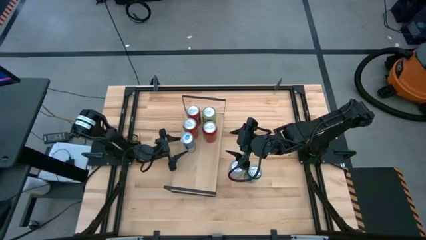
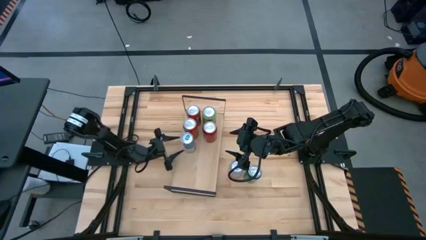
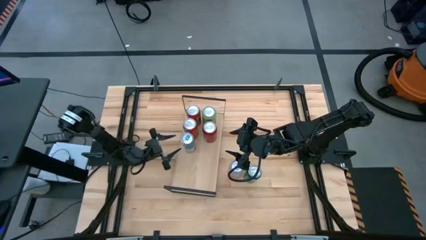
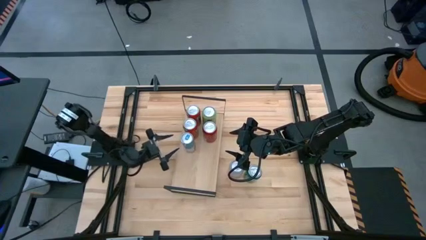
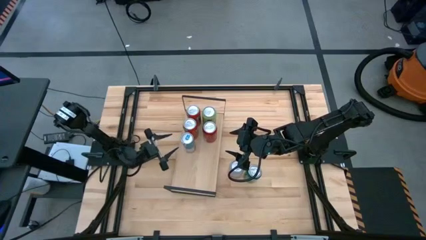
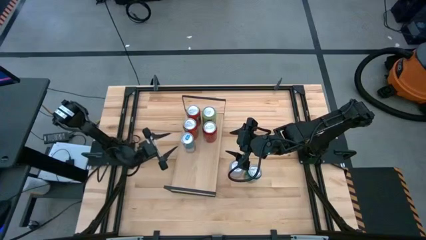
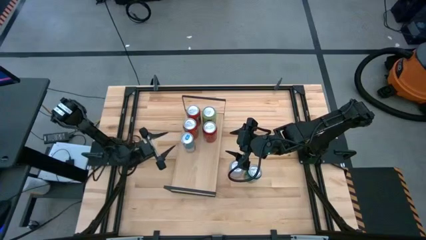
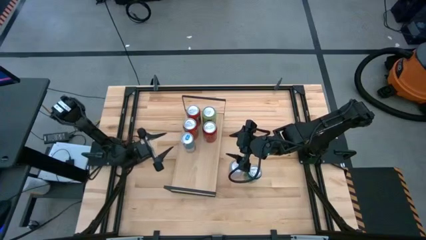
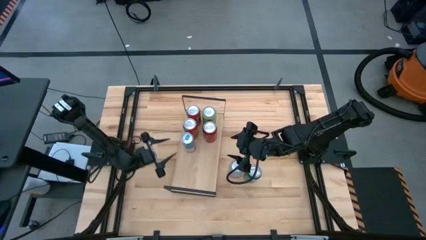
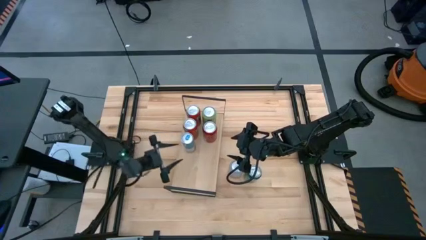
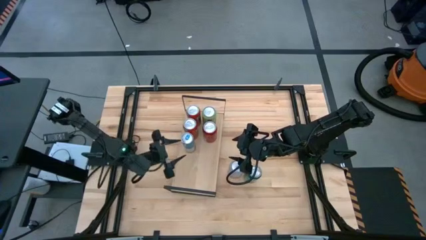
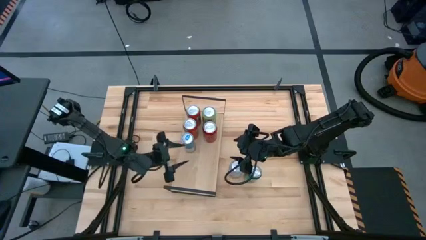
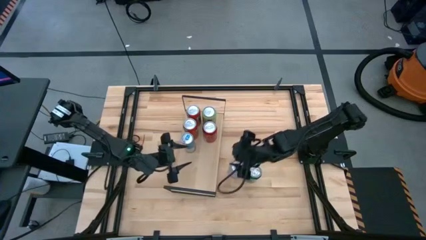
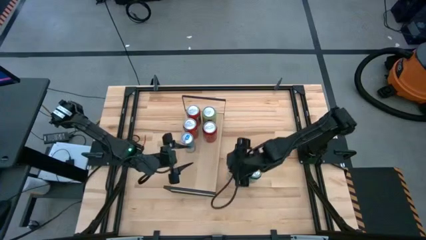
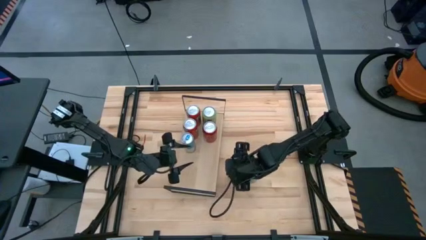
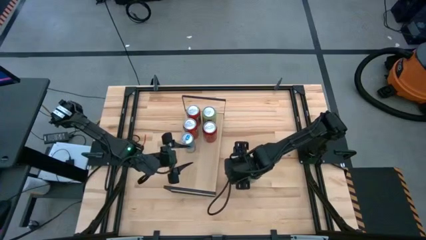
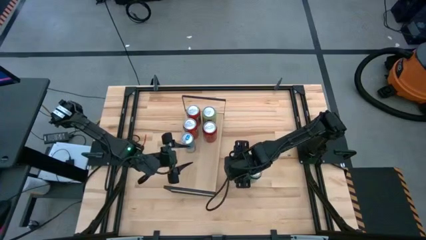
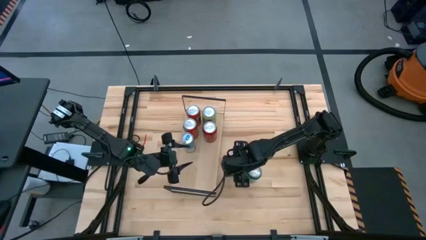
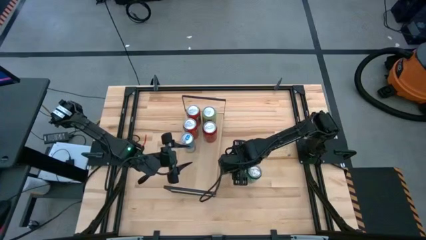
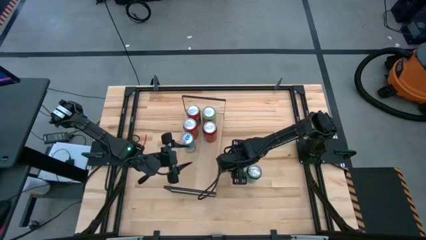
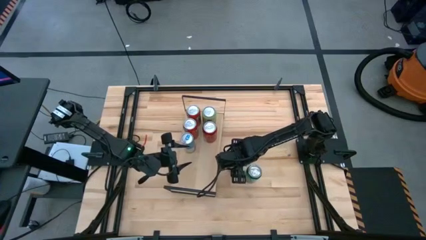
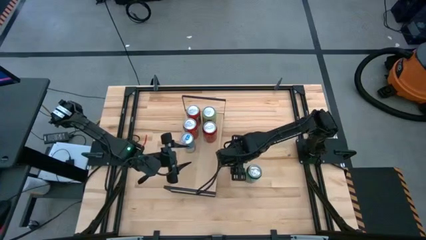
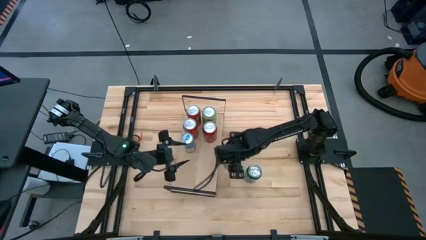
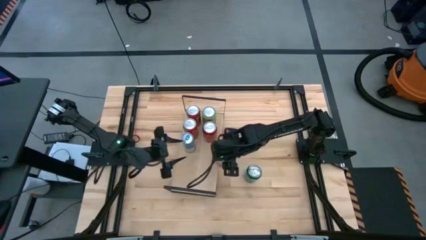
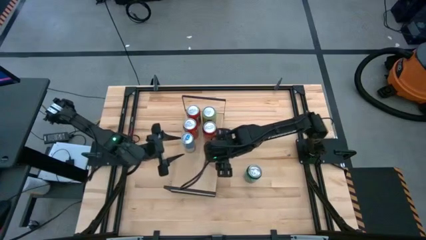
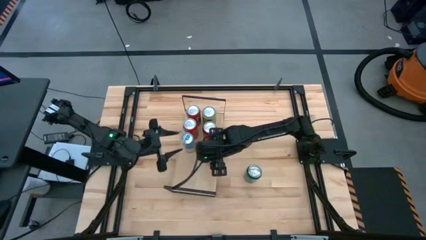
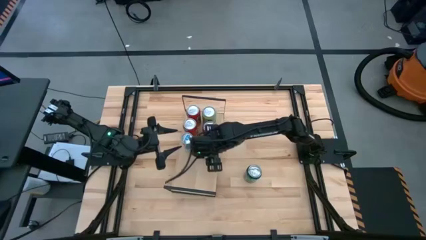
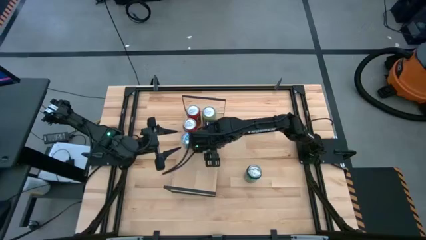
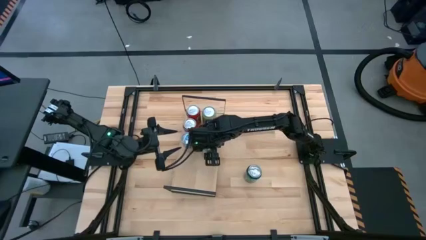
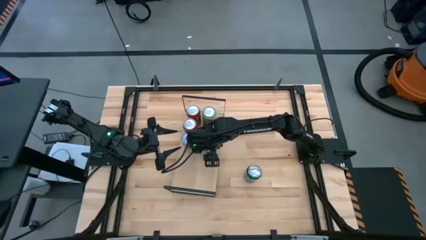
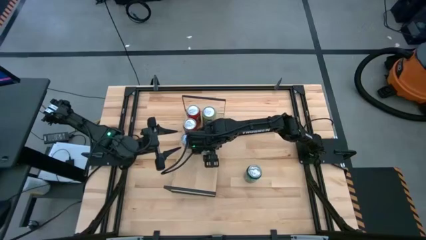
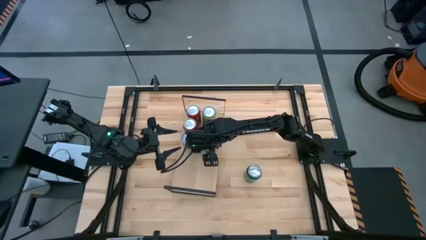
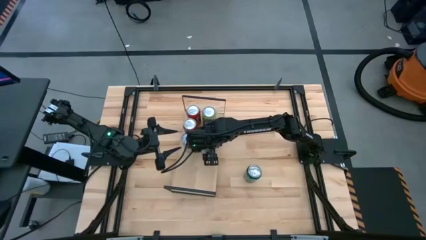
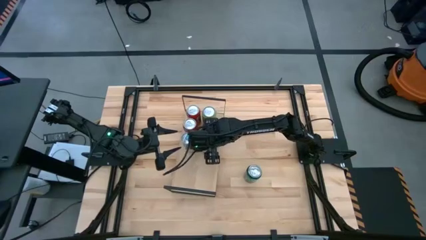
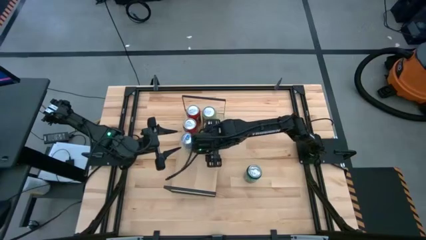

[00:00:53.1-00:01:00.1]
Task: Place canned beverage on shelf
Put the orange and white soda can on the shelf

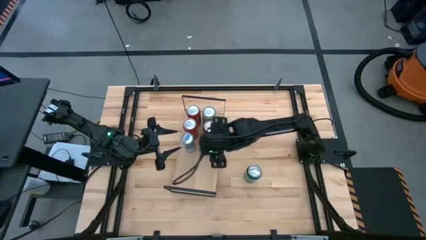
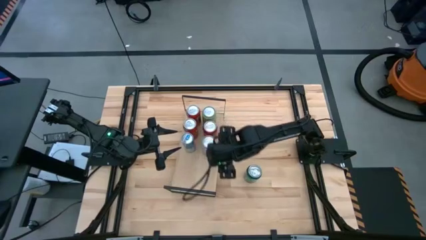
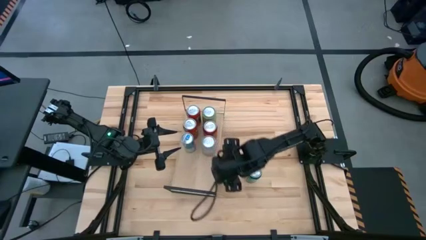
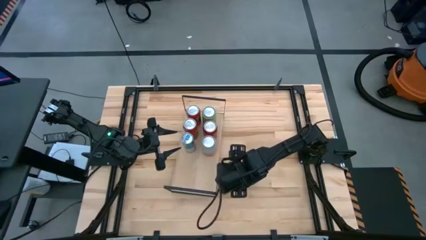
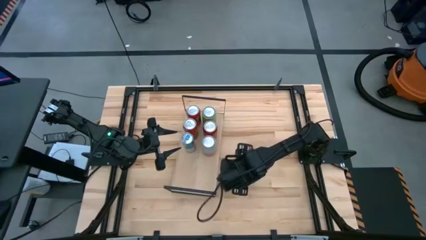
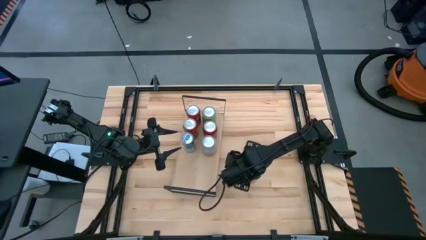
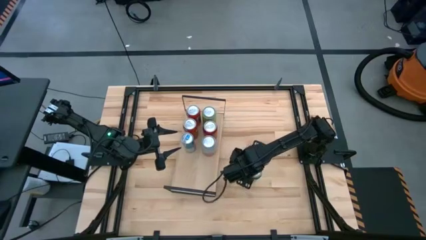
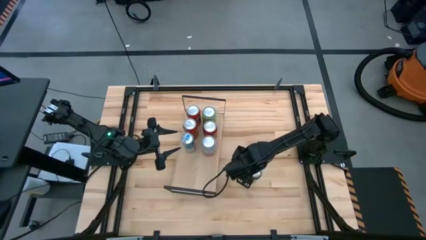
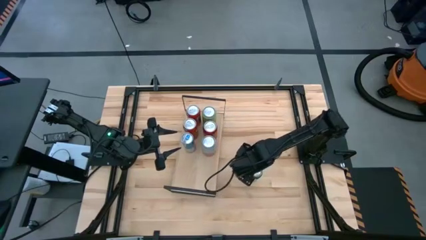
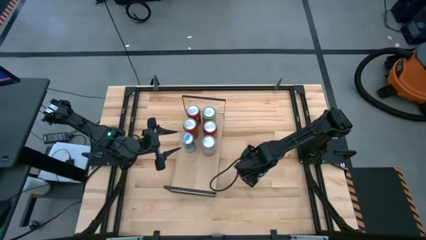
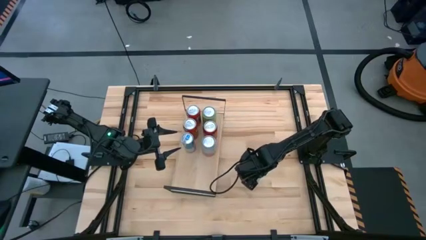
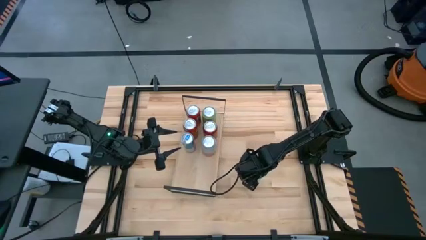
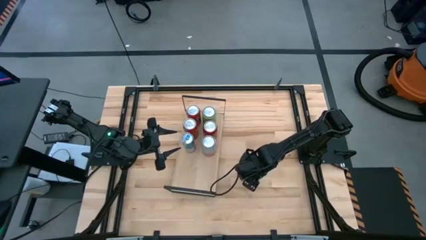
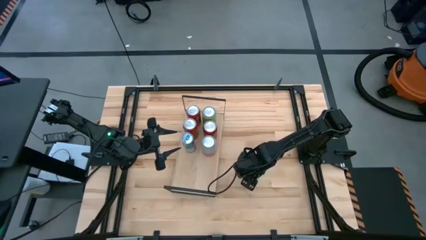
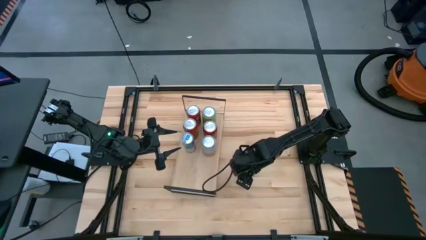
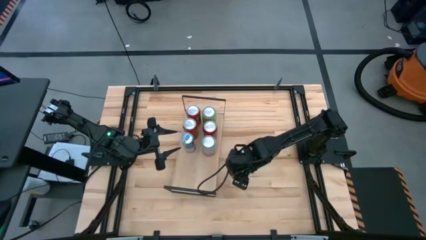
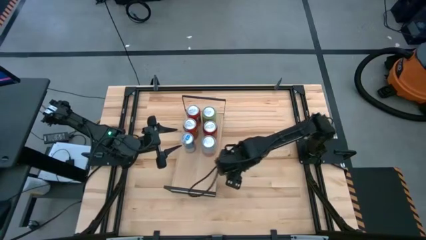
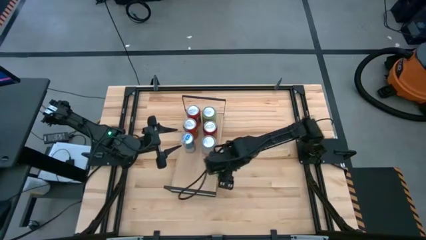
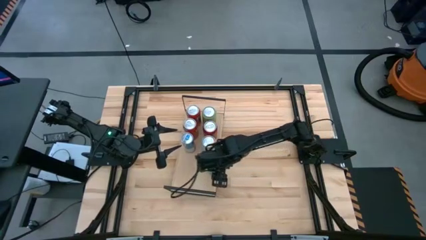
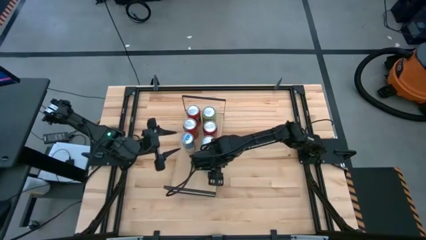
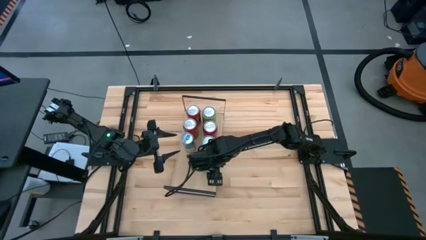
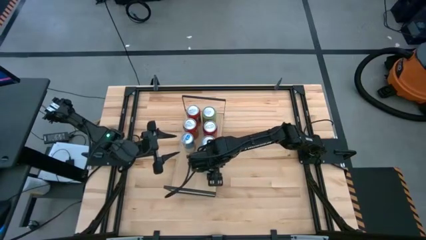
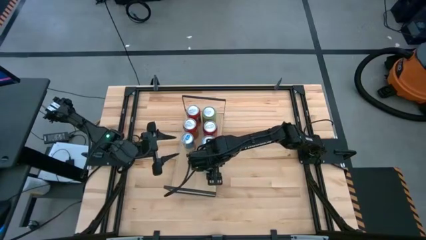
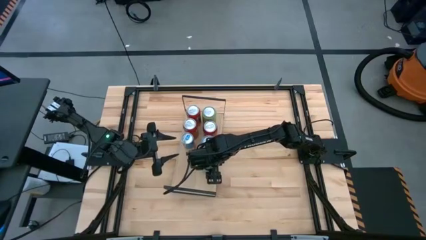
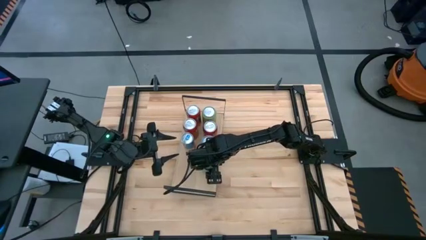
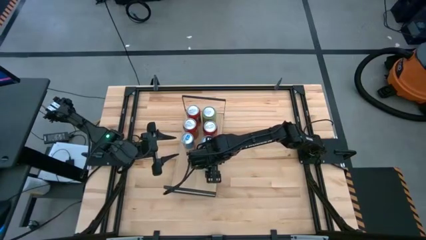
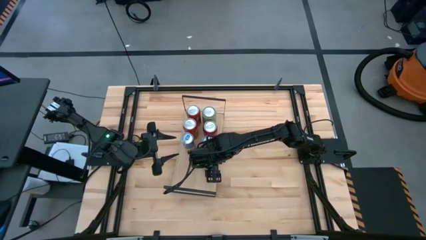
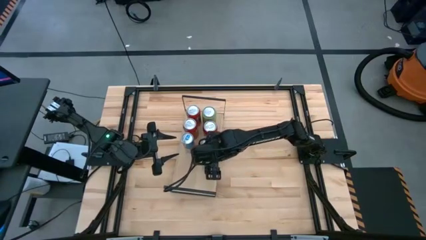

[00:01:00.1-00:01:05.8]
Put the green soda can on the shelf

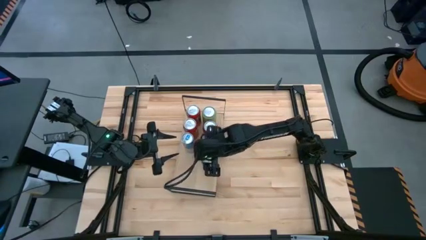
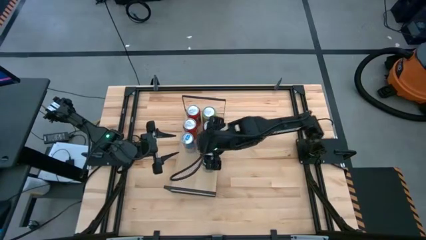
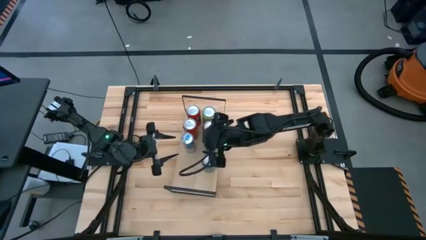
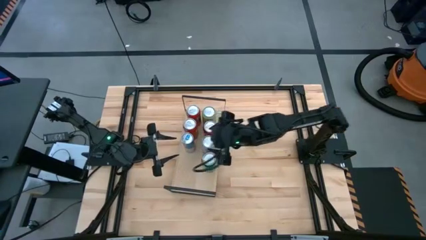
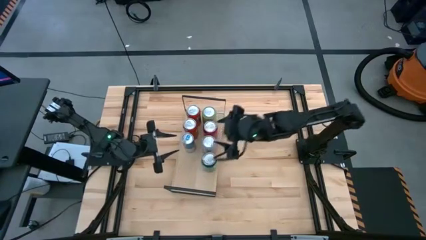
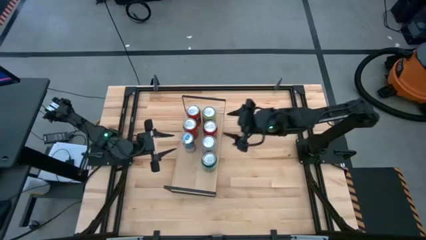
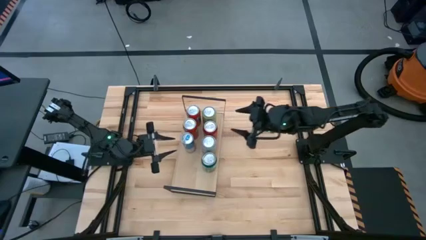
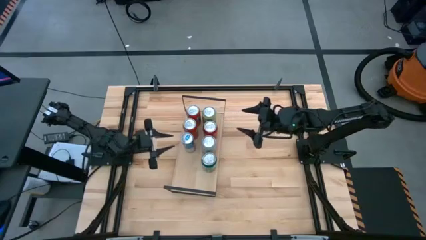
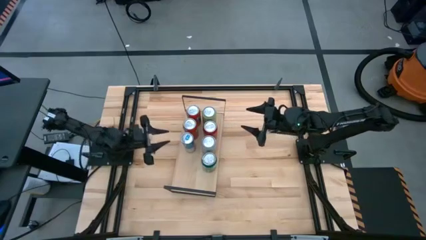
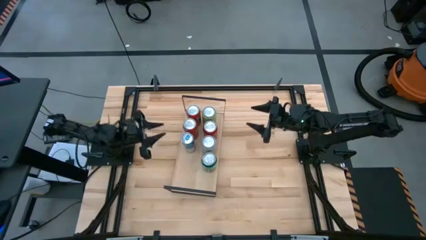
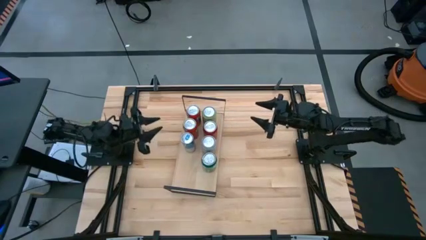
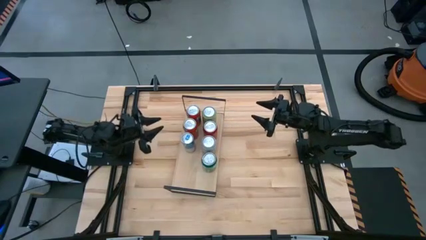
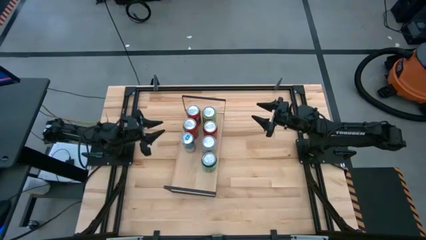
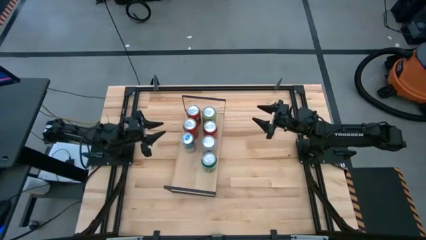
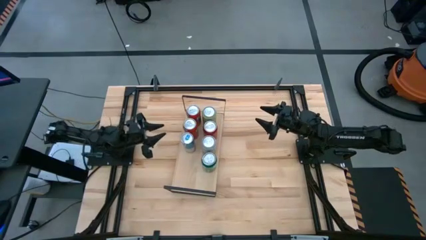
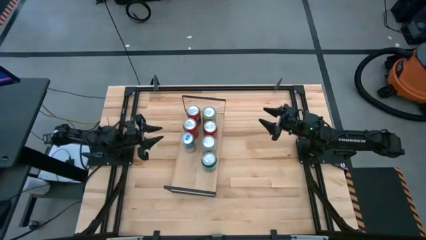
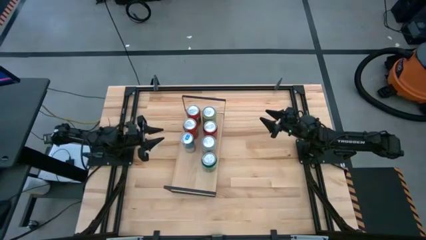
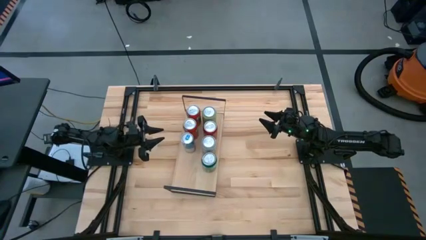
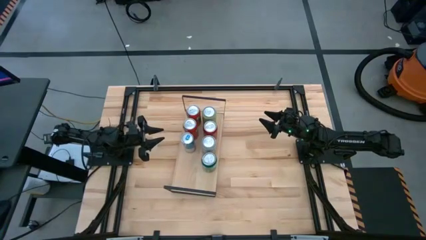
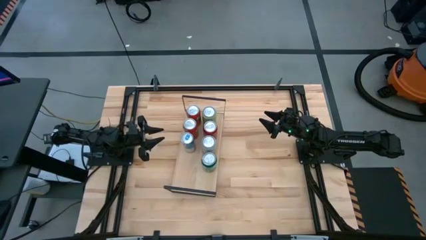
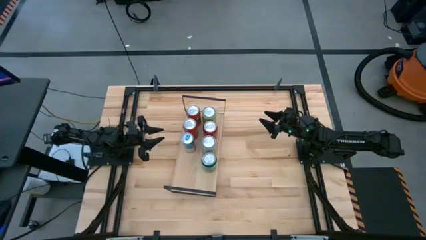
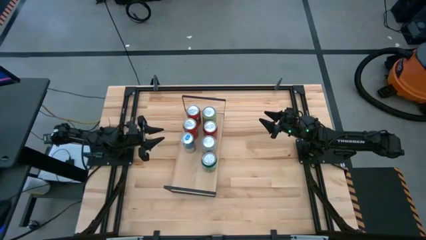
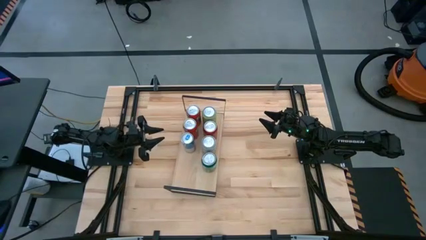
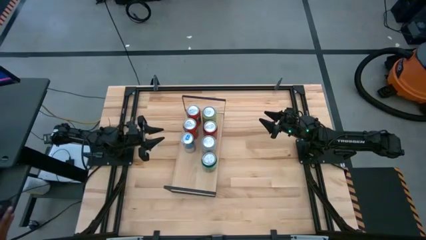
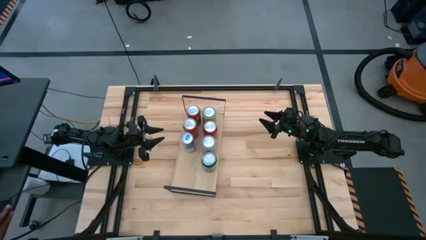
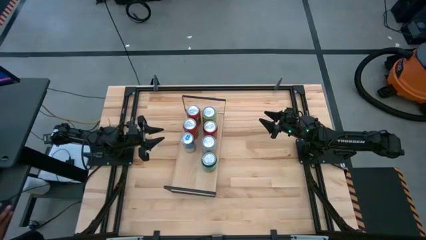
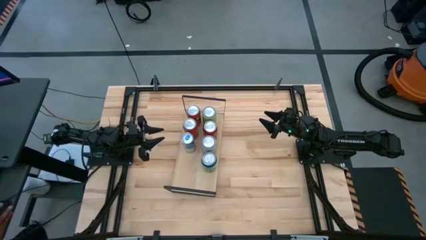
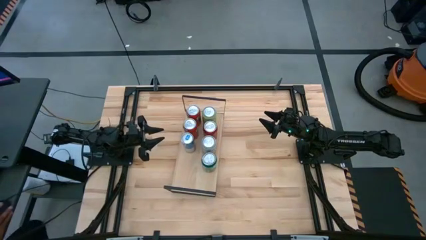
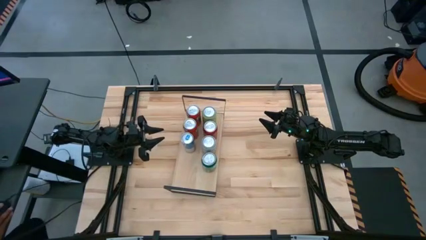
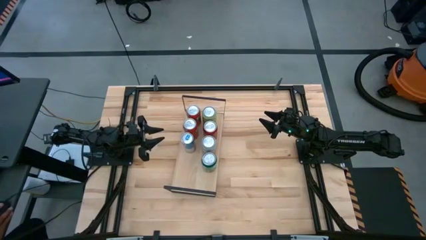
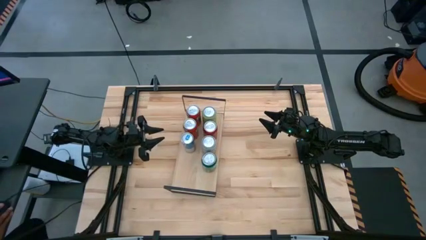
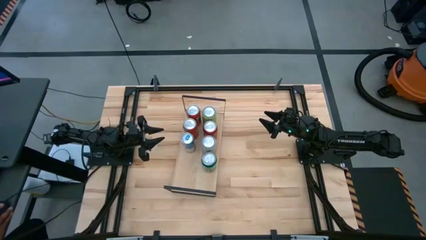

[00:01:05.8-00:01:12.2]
Return to Home Position
